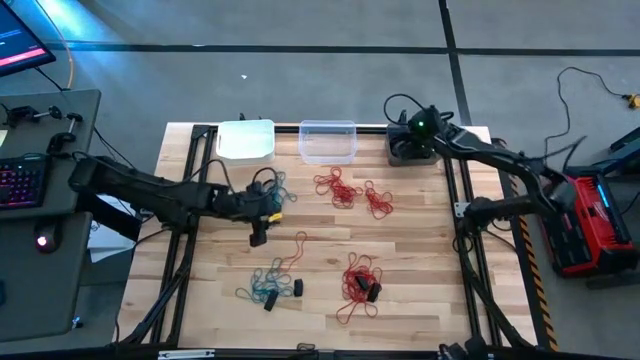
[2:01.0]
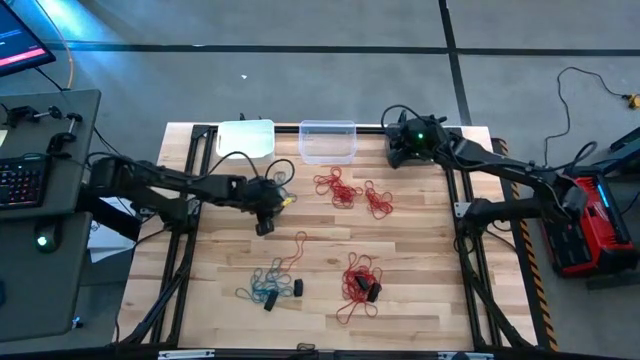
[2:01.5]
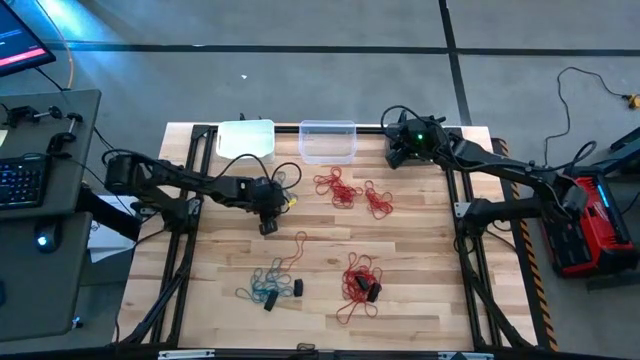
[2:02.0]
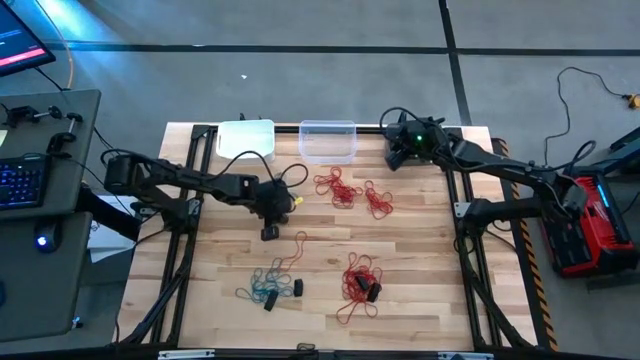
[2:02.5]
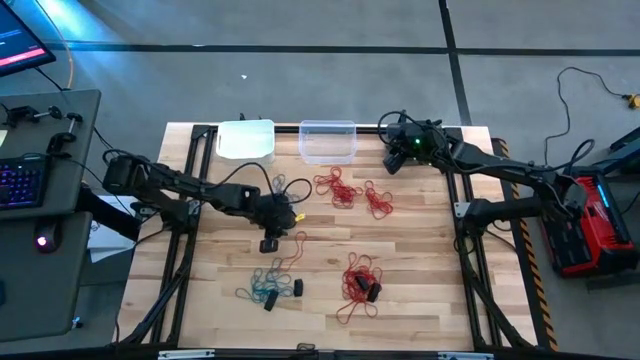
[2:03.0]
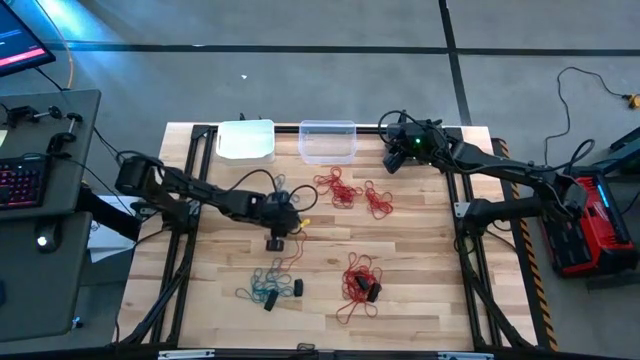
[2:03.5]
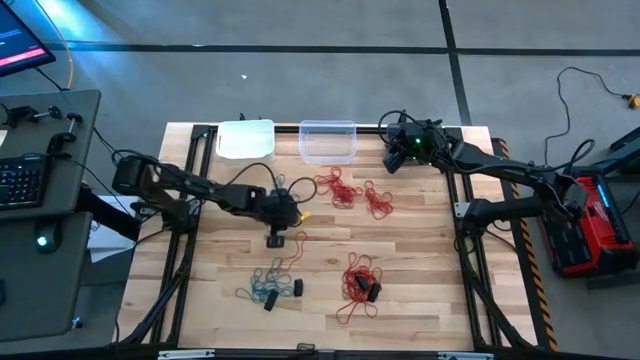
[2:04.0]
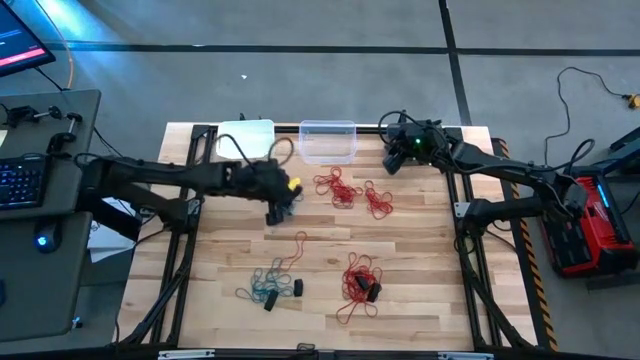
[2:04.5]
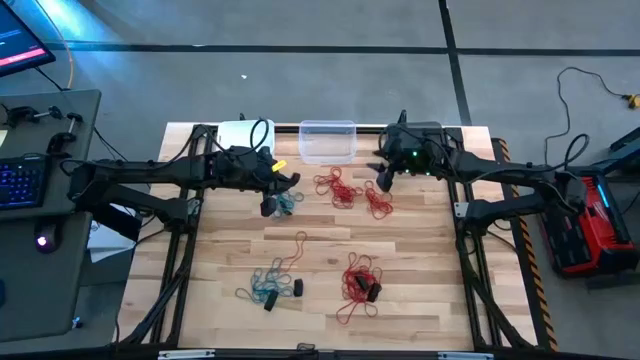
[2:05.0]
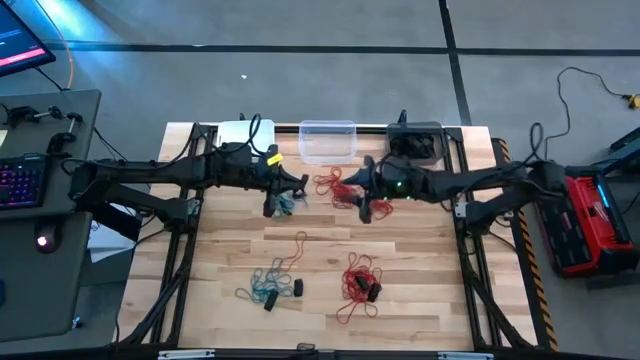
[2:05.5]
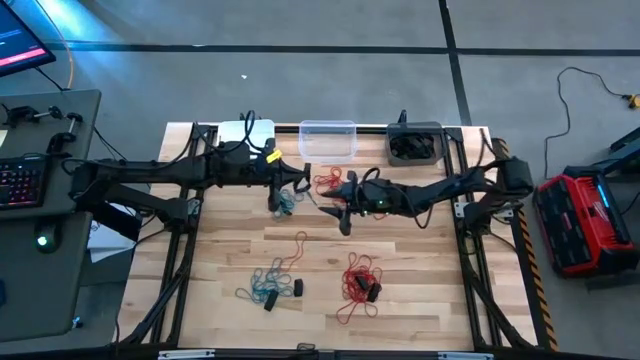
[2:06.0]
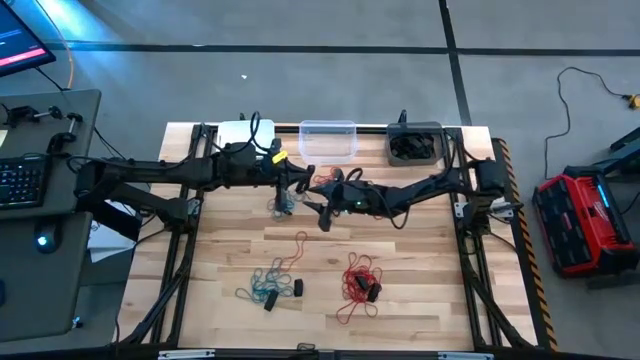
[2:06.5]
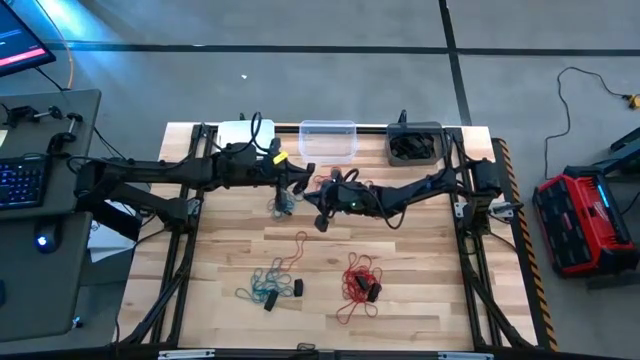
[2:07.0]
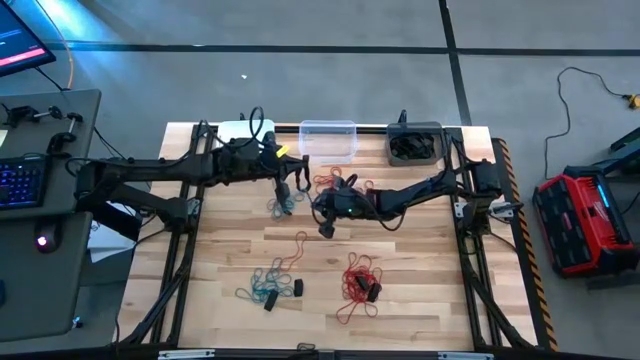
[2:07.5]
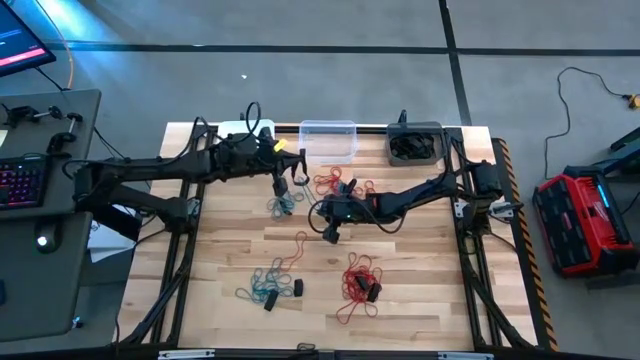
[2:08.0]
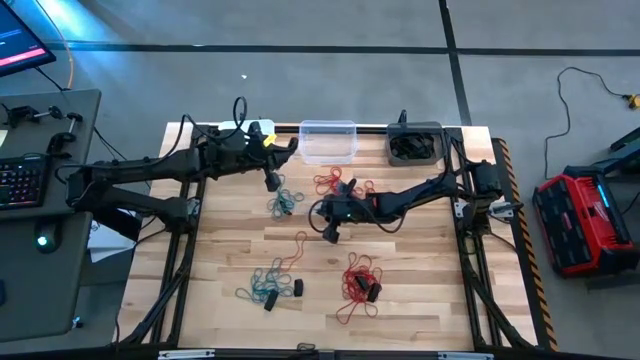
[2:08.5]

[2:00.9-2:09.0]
Task: Sort rubber bands into baskets
Put the black rubber band into the black bin

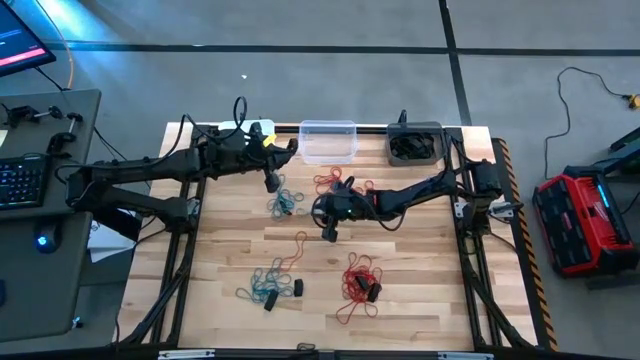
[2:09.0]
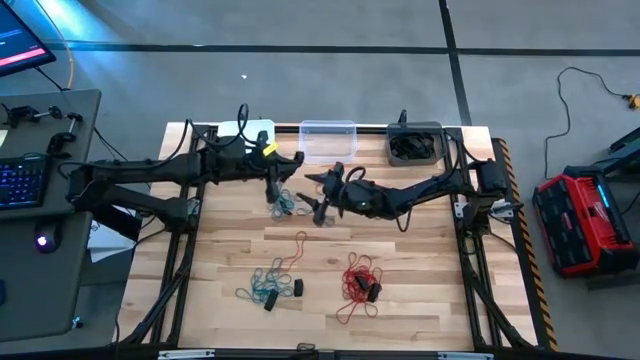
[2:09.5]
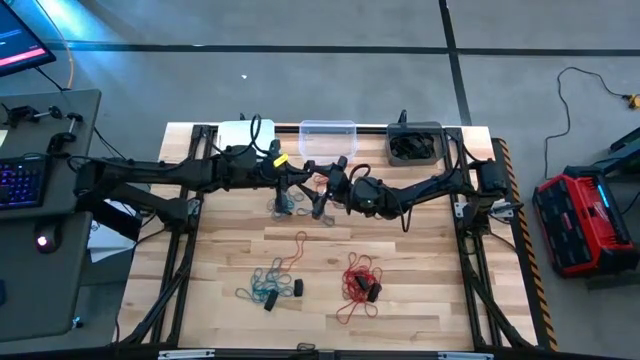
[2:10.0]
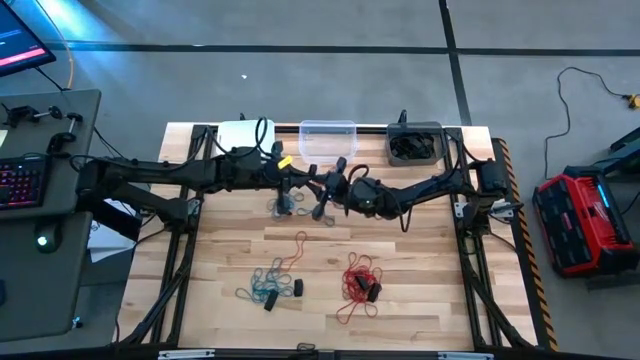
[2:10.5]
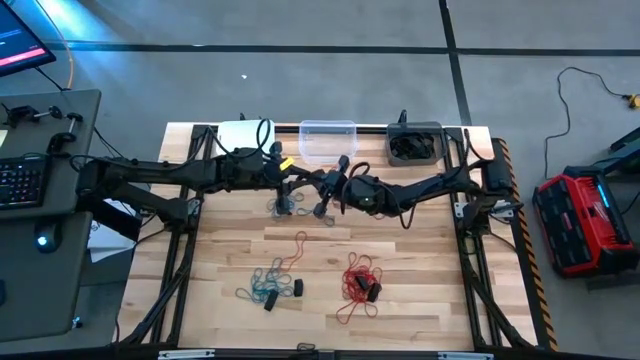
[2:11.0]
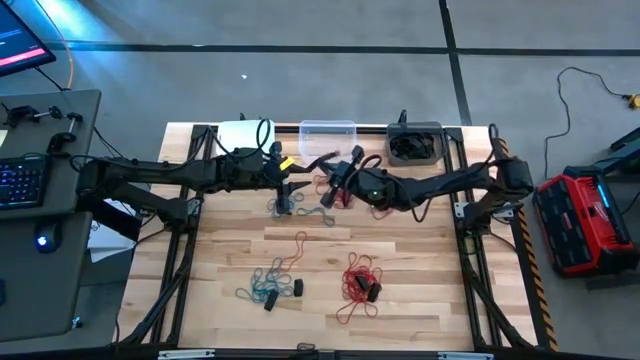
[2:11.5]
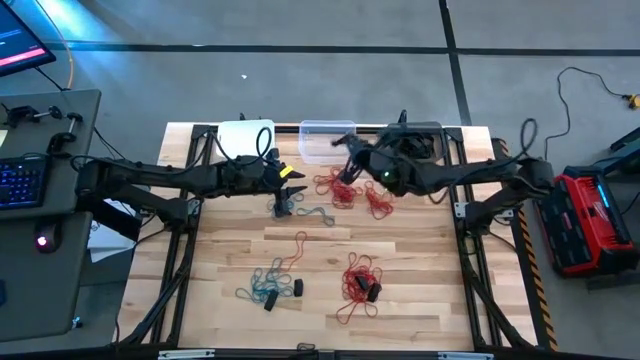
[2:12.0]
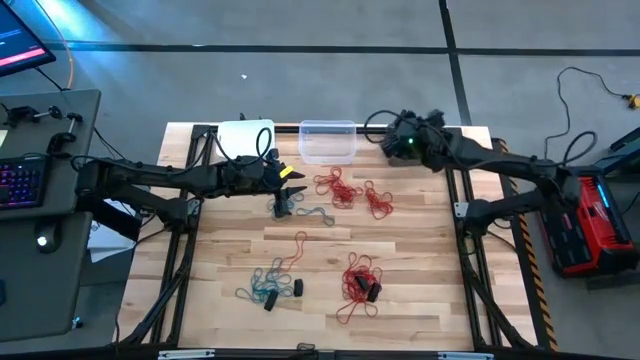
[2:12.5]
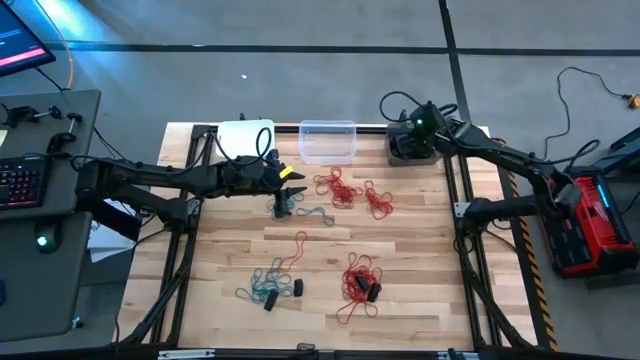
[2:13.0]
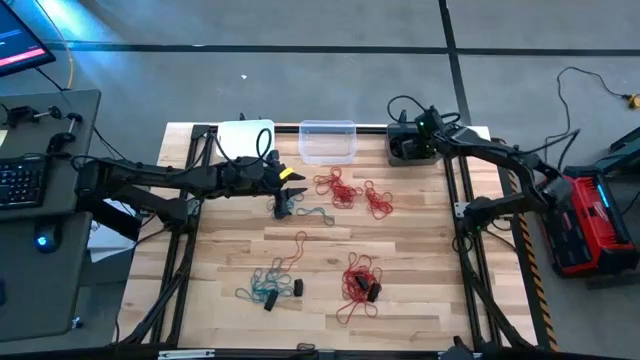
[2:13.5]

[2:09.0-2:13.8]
Put the black rubber band into the black bin

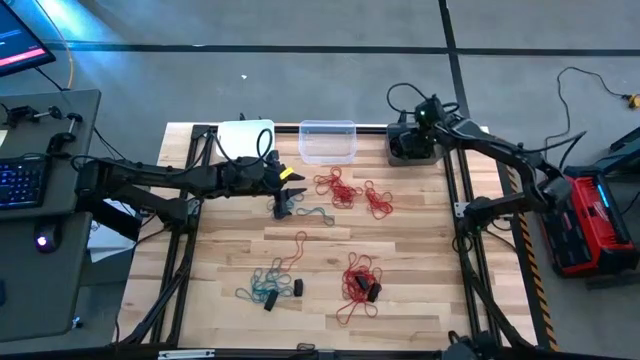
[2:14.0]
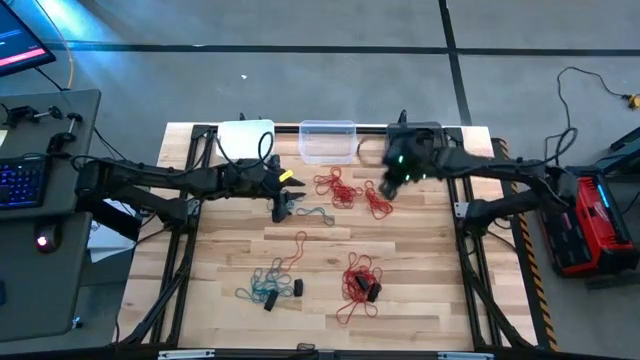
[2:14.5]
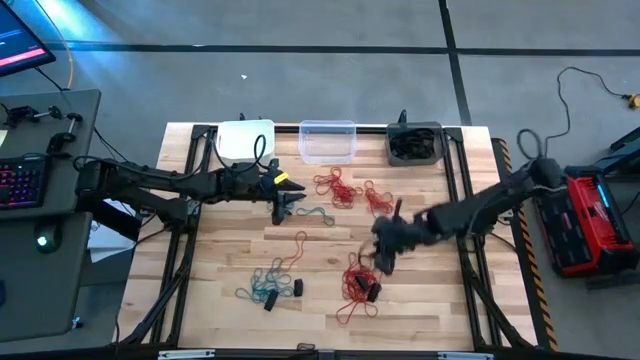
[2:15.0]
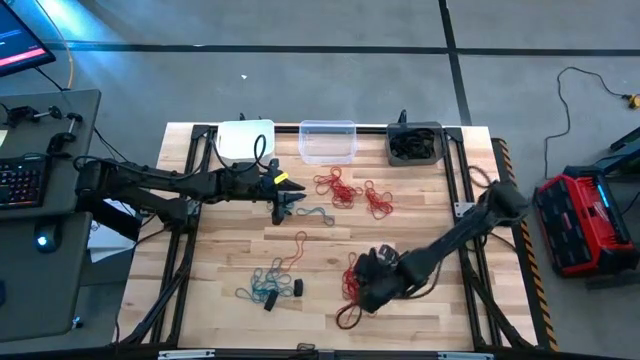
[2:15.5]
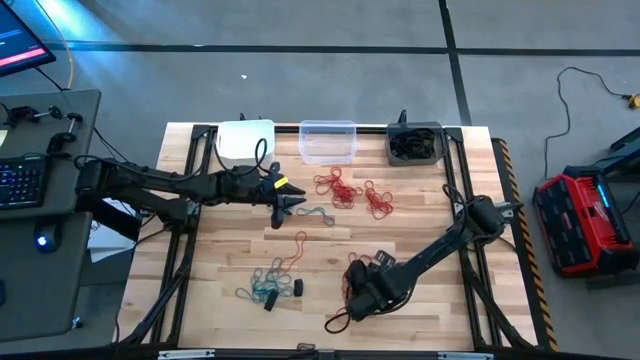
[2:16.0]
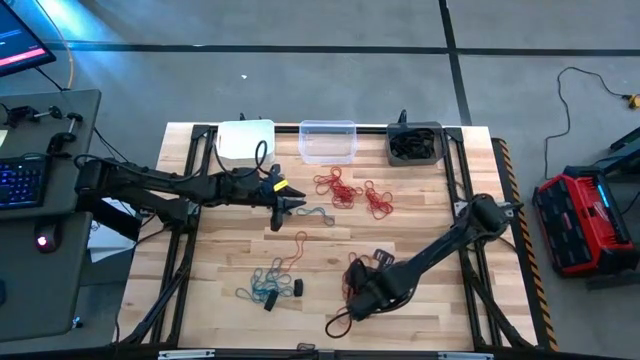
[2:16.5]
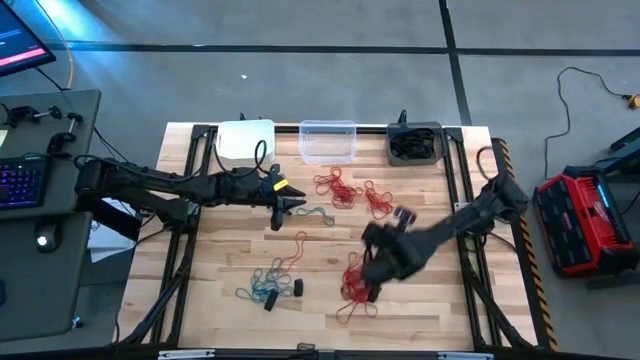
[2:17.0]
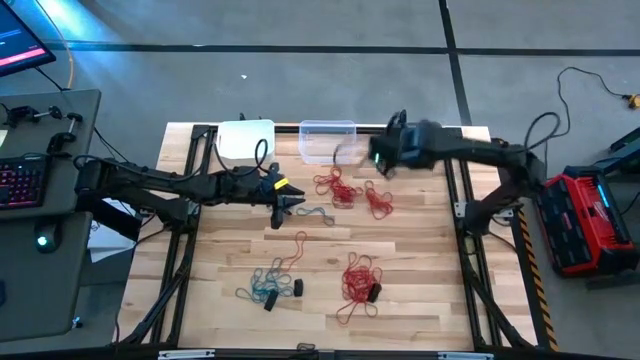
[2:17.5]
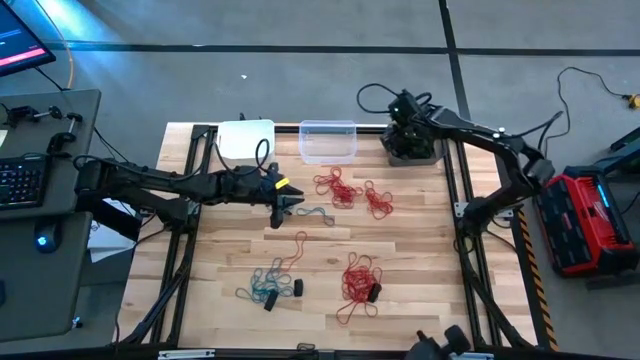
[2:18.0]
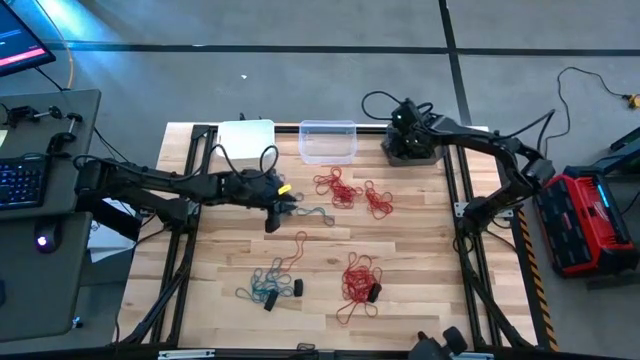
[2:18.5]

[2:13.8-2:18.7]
Put the black rubber band into the black bin

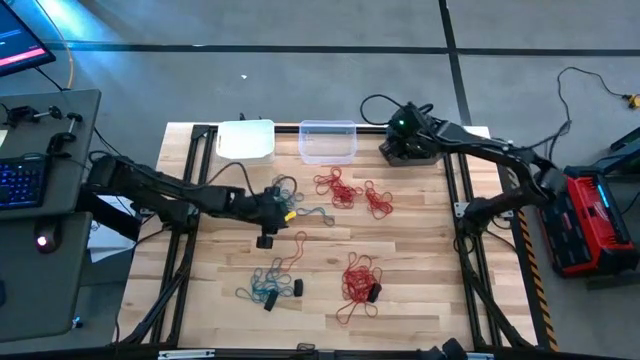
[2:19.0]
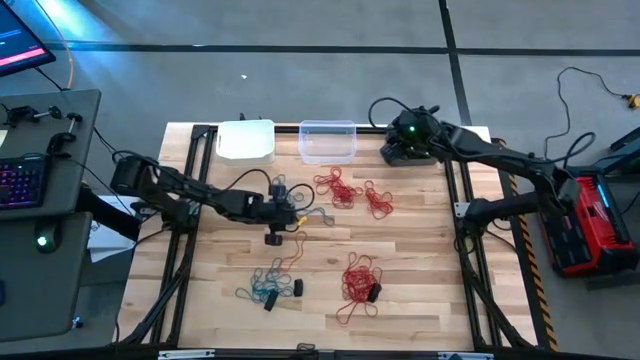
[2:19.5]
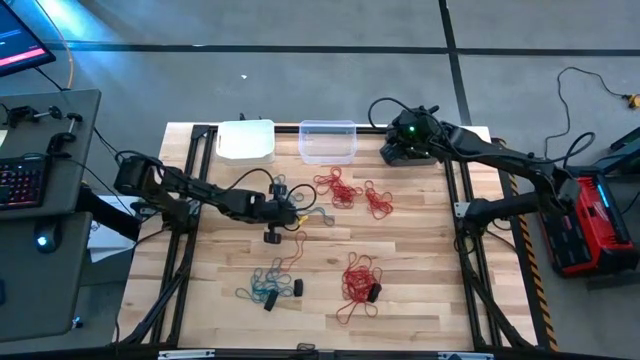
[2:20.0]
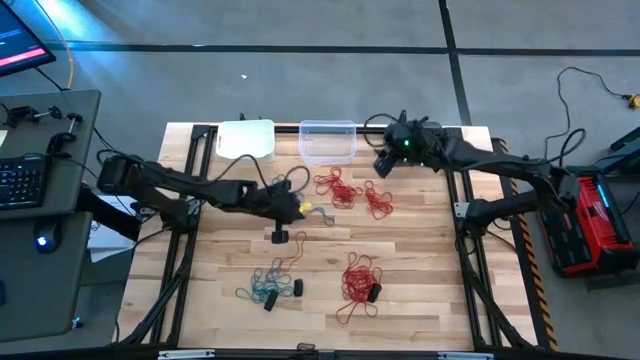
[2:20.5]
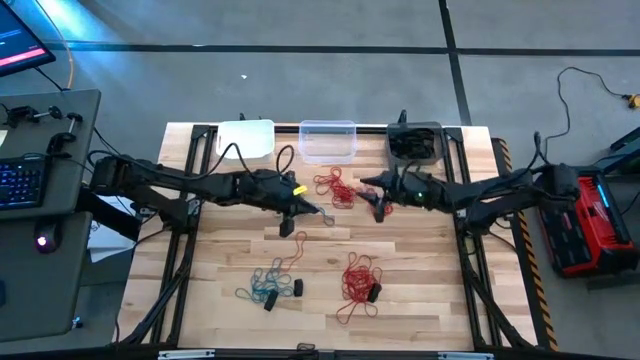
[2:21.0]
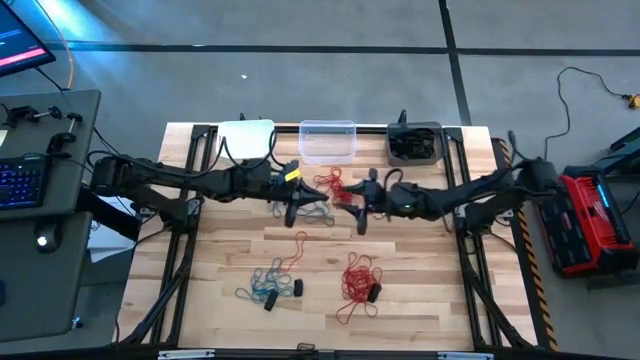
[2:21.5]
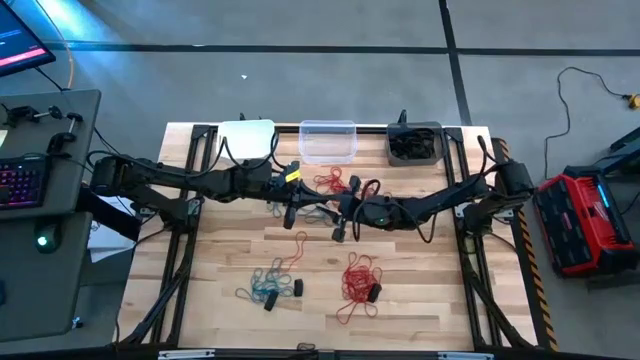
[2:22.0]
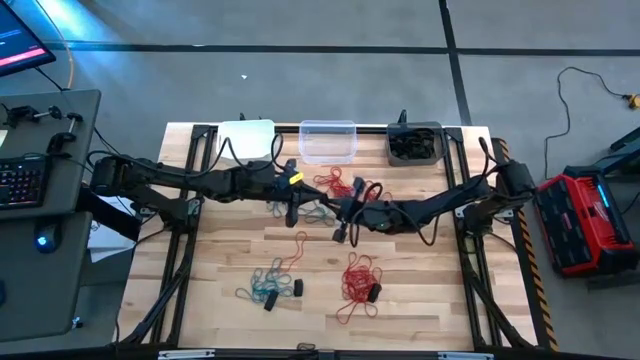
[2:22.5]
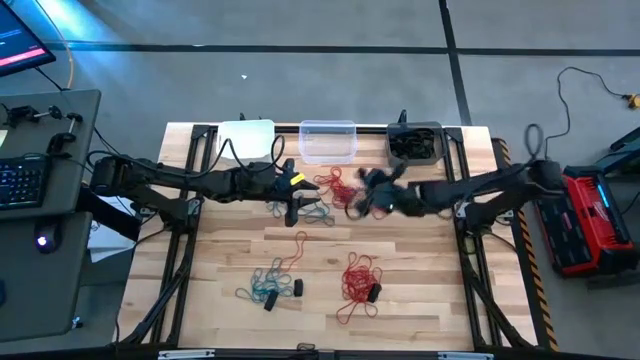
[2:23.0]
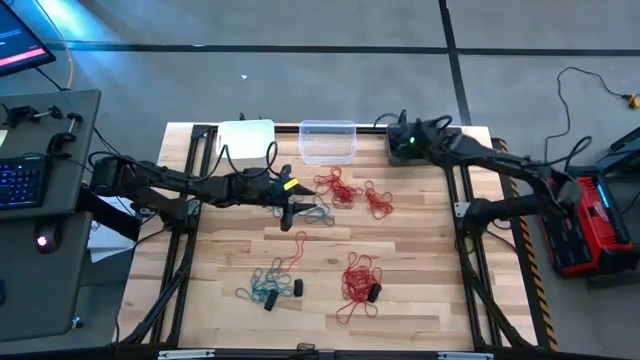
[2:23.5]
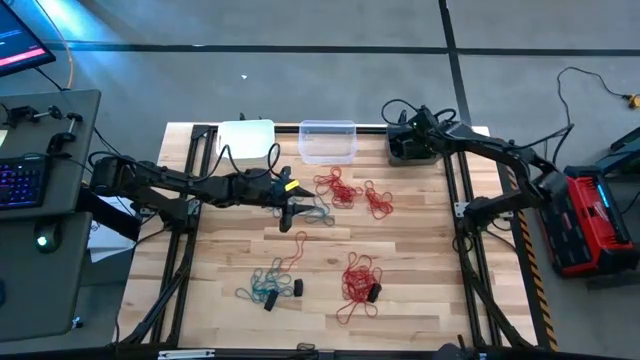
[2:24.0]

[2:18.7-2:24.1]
Put the black rubber band into the black bin
